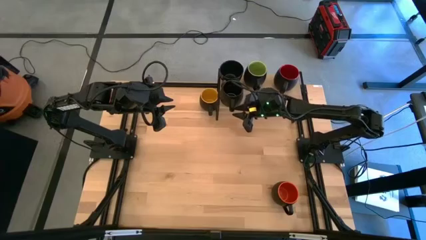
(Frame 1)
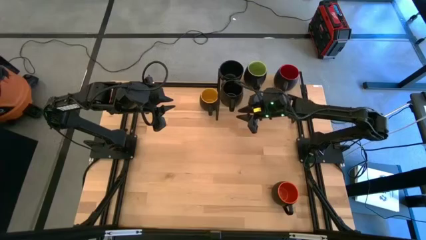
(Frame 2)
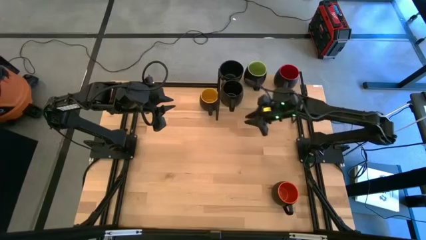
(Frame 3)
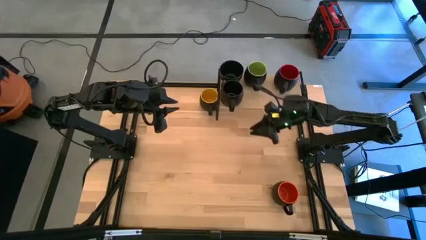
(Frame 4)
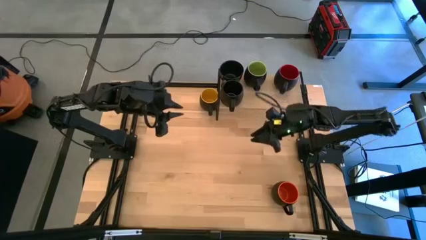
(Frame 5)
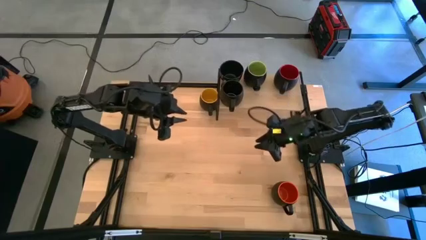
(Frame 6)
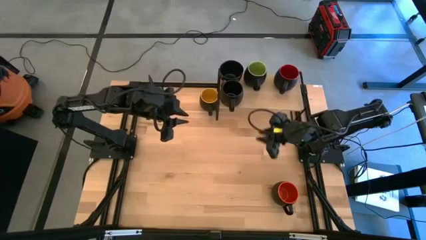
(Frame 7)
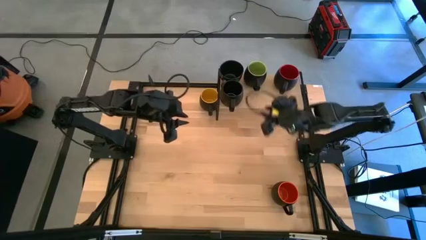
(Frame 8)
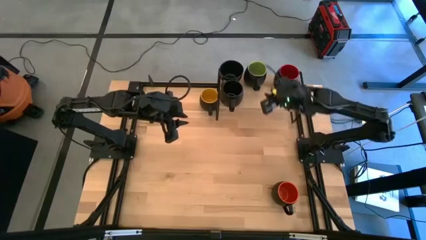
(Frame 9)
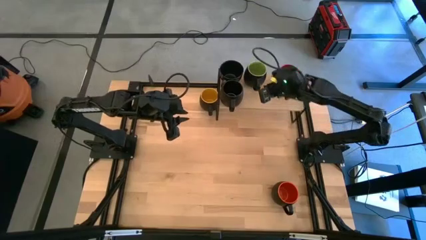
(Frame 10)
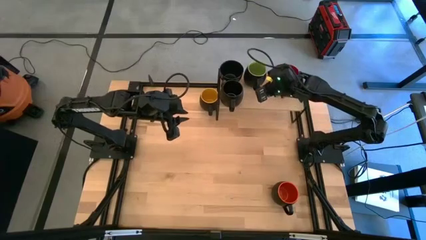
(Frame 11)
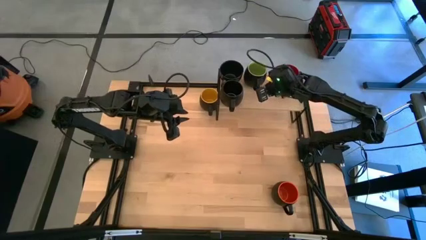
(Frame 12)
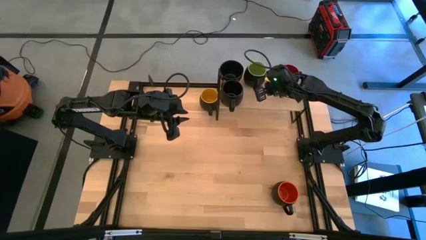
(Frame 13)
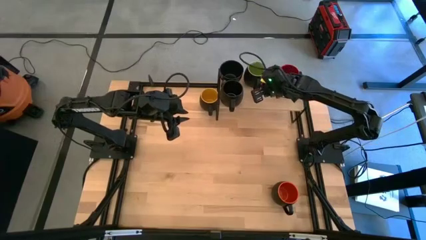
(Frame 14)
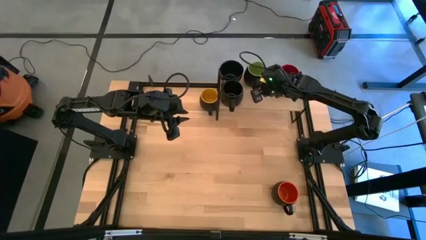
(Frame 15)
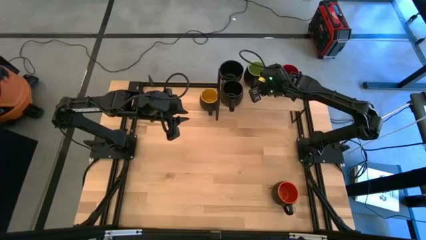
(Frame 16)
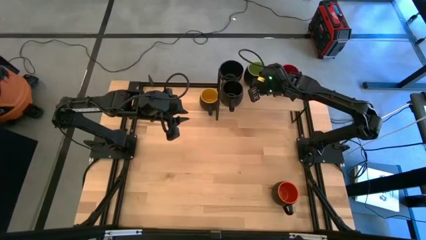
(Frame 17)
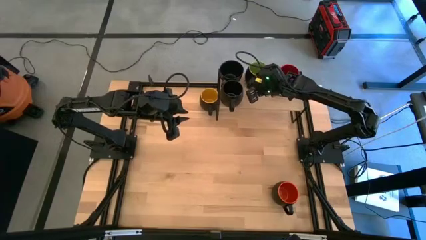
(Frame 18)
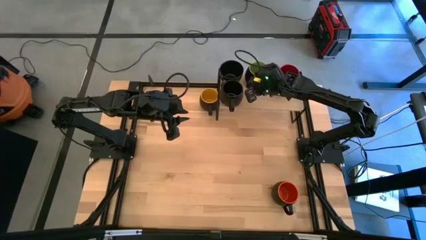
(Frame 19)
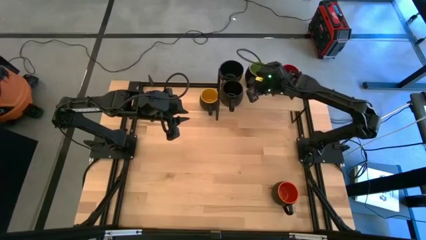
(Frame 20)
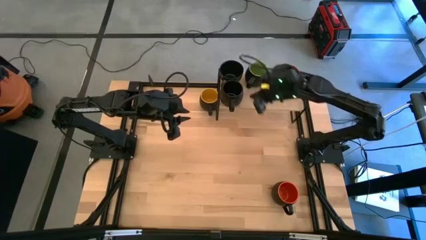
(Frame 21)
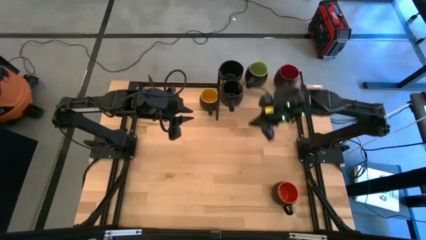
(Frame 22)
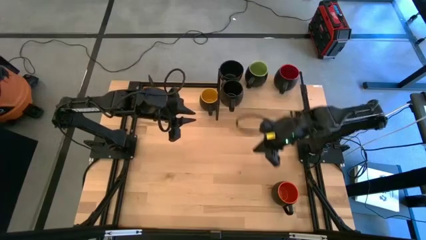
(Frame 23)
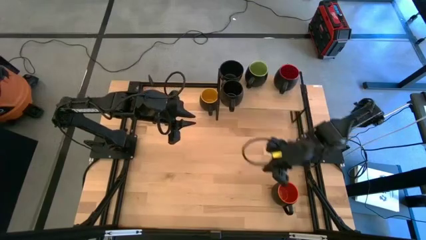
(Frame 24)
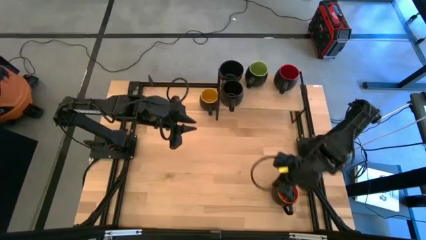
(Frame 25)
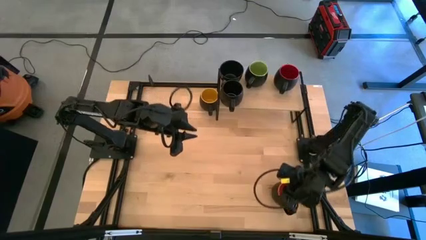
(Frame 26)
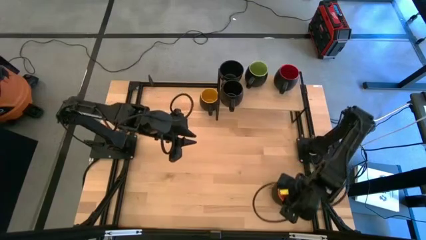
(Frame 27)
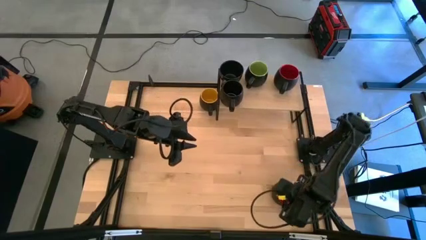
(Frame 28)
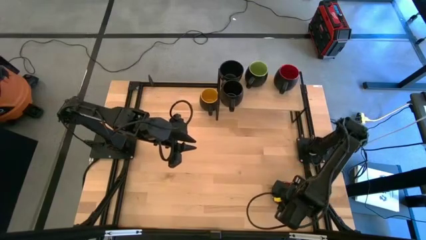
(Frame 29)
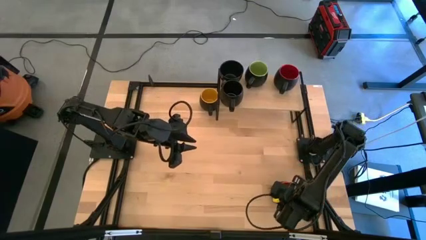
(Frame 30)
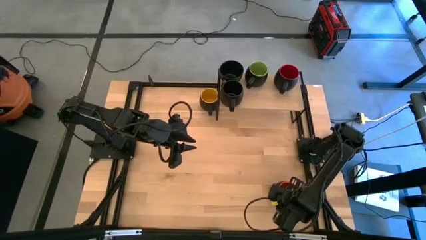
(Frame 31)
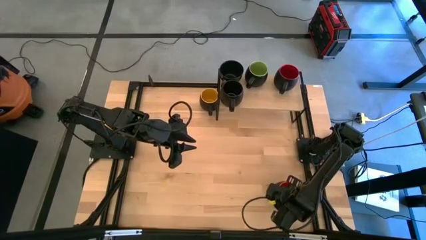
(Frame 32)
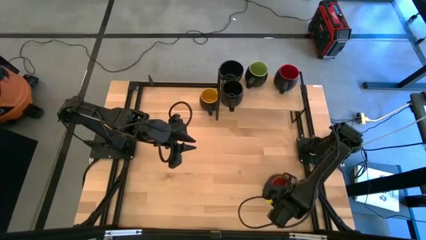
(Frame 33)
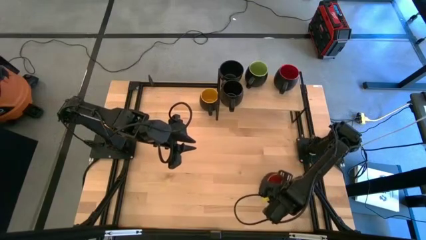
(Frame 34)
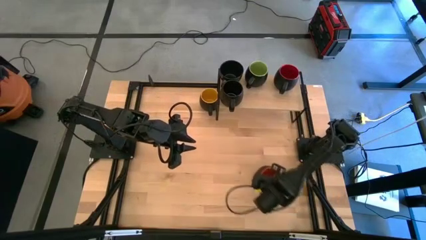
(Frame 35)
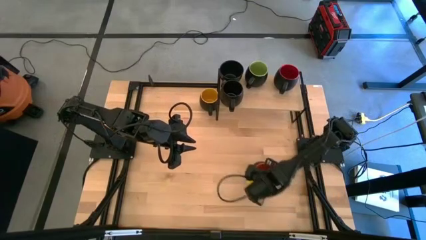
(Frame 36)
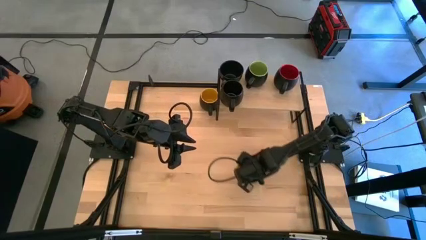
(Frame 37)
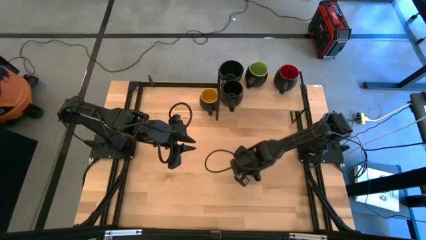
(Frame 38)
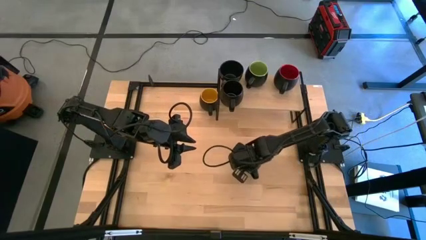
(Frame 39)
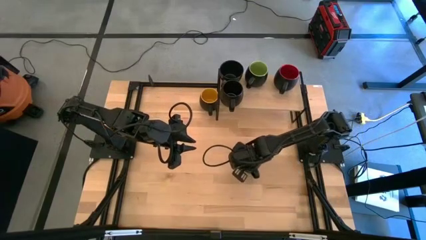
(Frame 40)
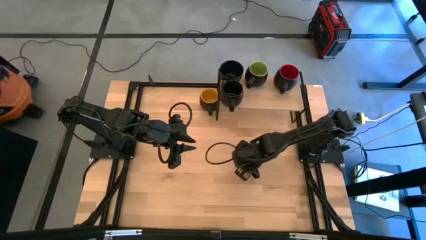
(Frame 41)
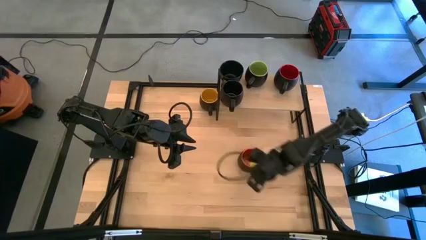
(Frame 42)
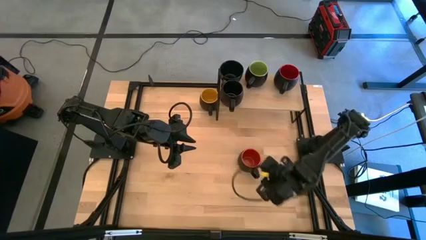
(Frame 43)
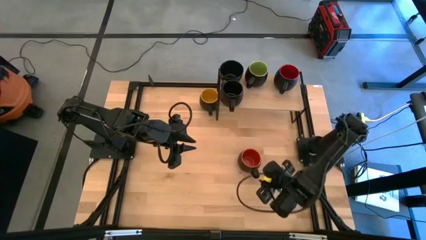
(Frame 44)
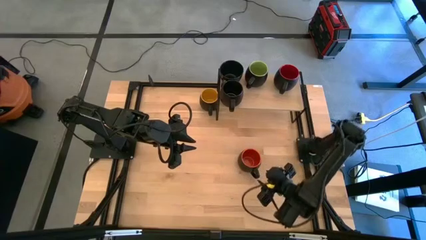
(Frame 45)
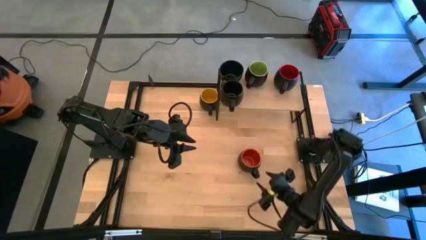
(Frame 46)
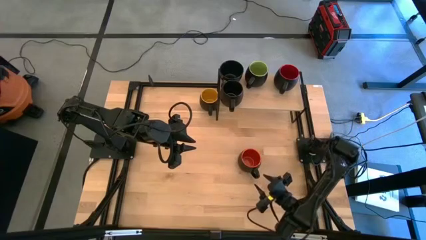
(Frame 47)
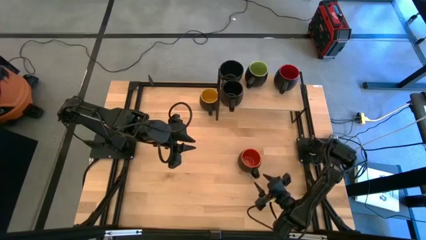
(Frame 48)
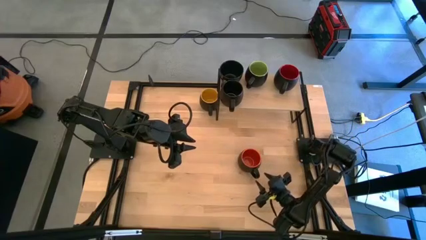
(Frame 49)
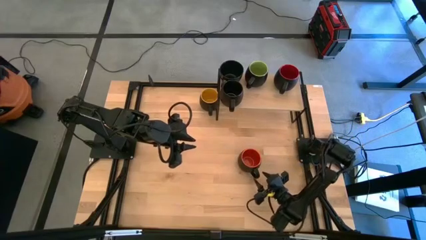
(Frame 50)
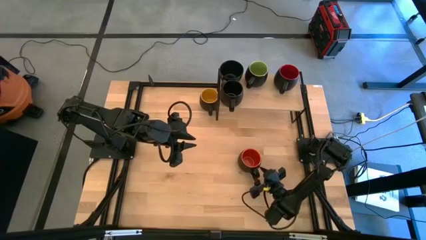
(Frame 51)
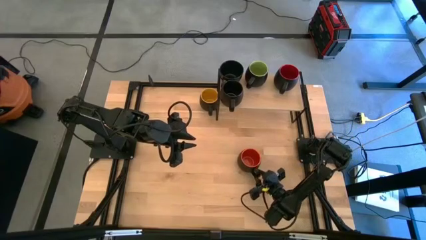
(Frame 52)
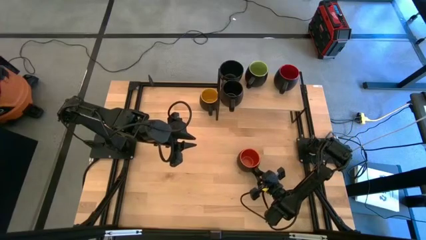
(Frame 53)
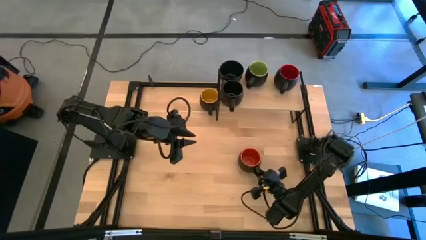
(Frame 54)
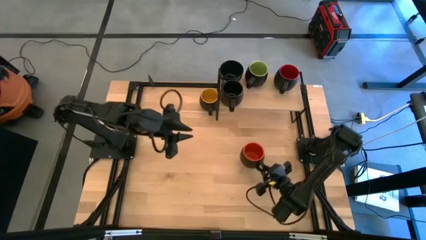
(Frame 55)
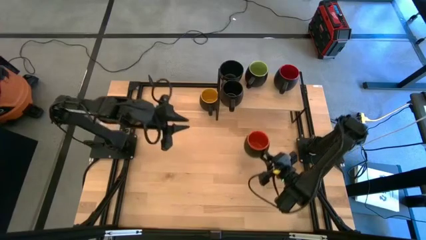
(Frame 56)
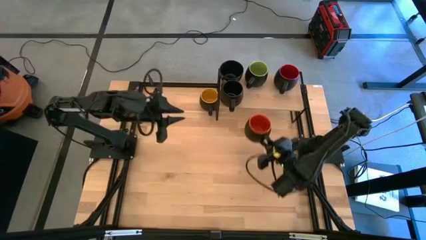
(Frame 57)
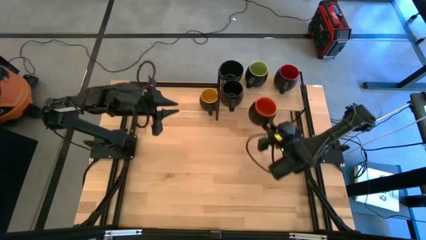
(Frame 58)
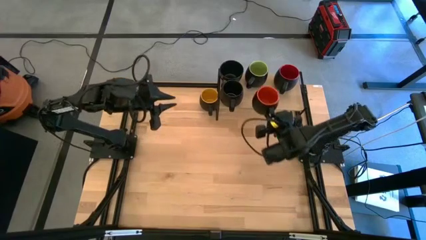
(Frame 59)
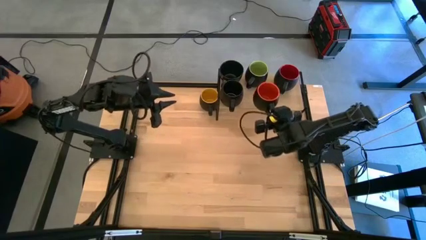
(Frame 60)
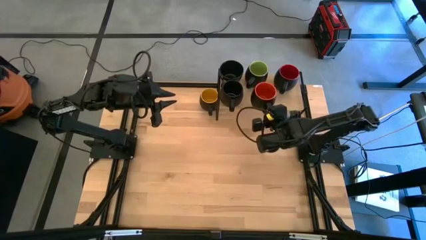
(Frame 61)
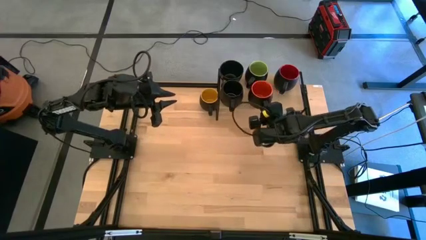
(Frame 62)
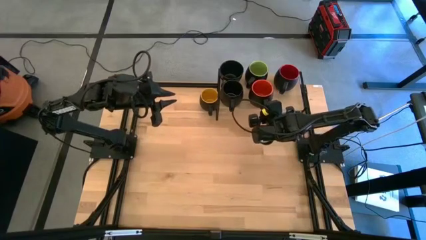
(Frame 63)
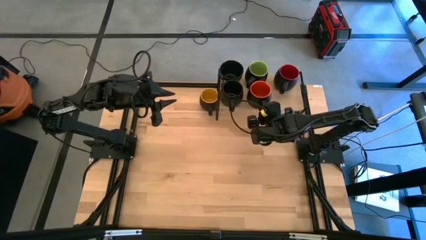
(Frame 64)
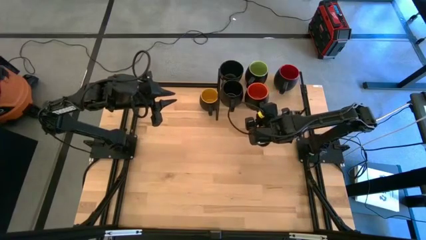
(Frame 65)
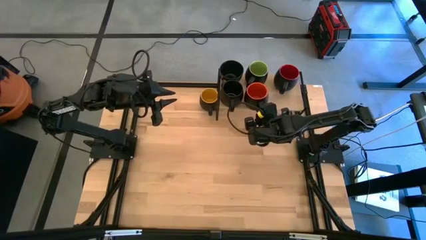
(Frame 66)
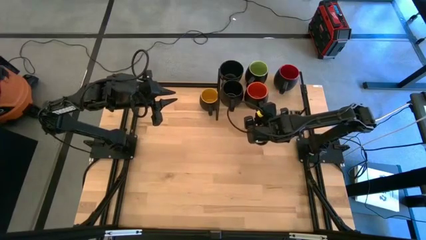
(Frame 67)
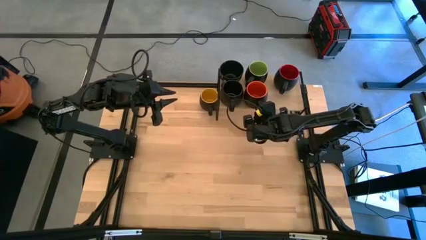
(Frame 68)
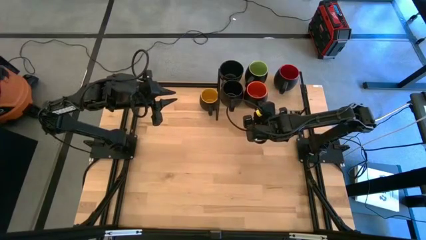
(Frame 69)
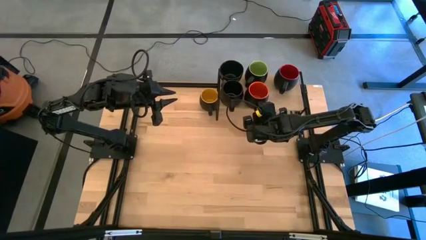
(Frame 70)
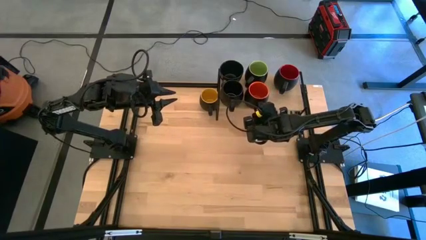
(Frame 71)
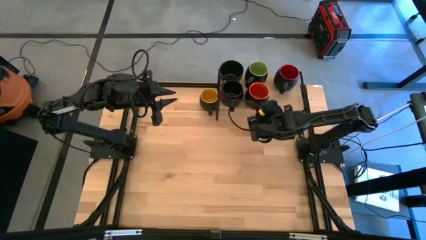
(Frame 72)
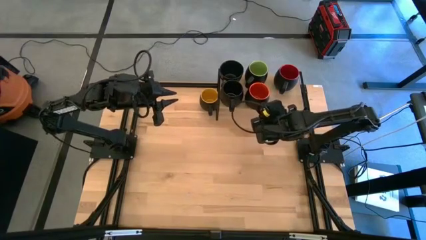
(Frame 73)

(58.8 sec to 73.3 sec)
Task: Place coffee mugs
Put the black orange mug on the shelf
